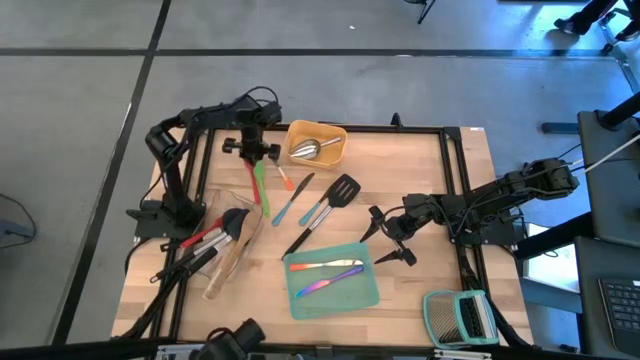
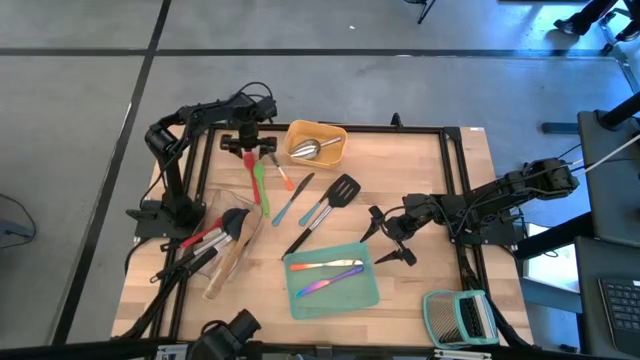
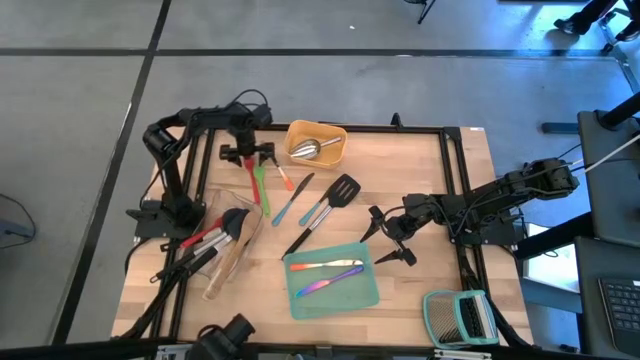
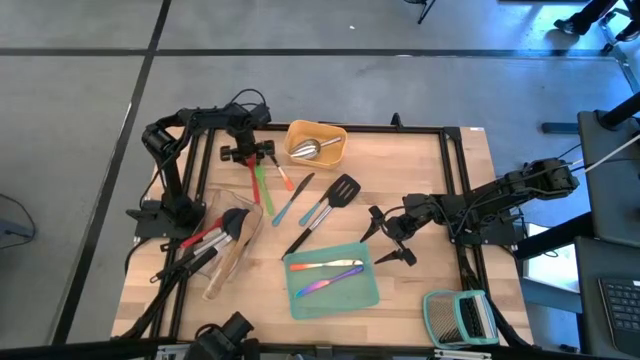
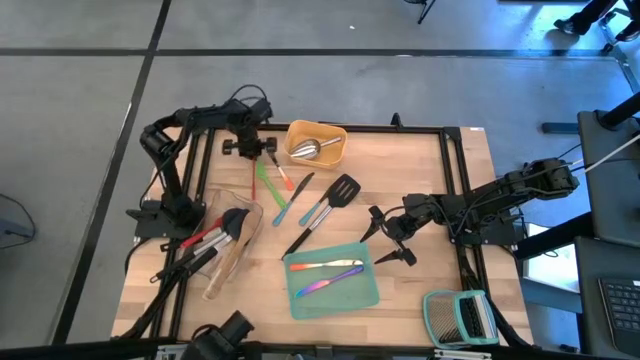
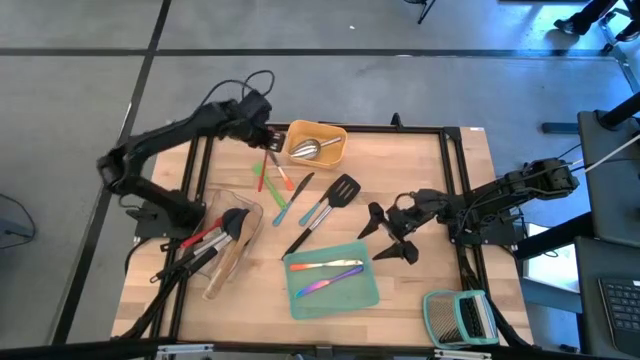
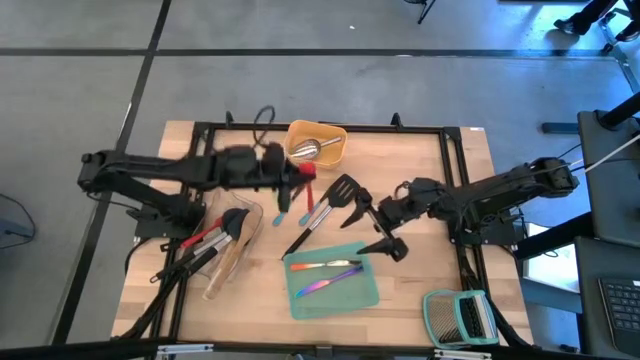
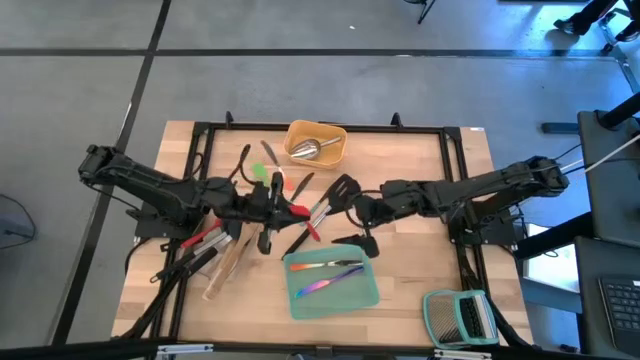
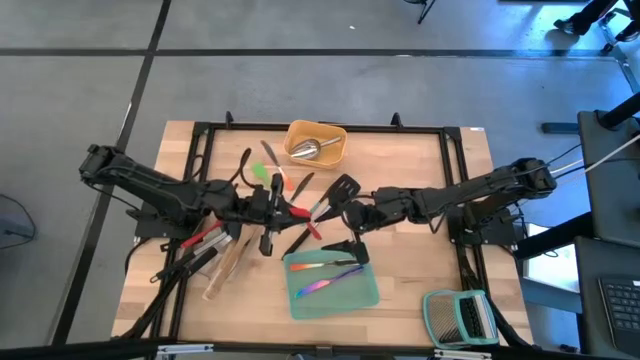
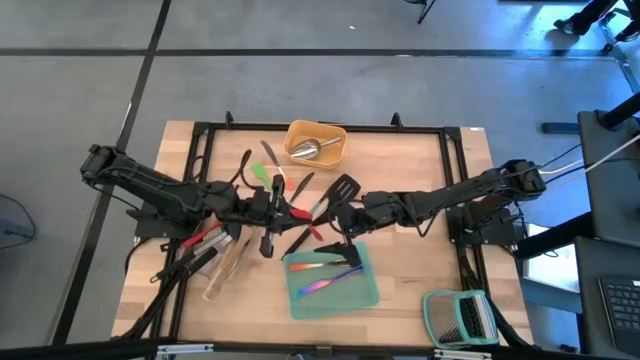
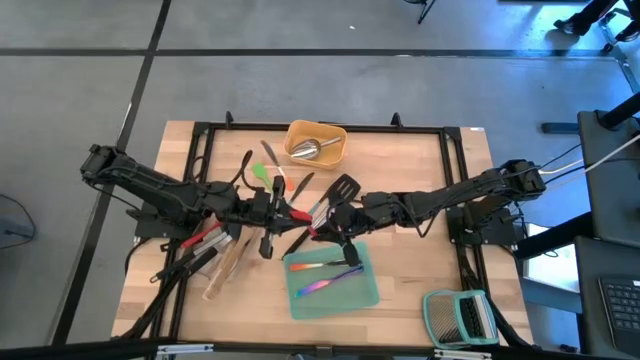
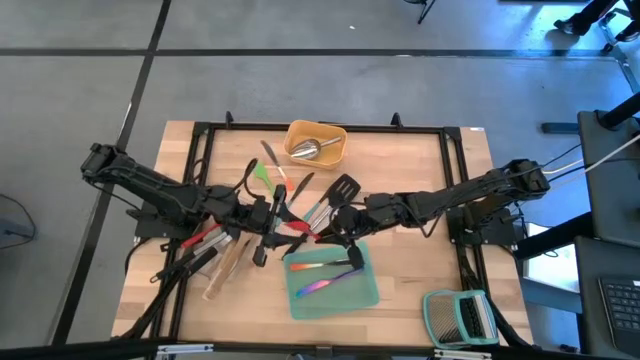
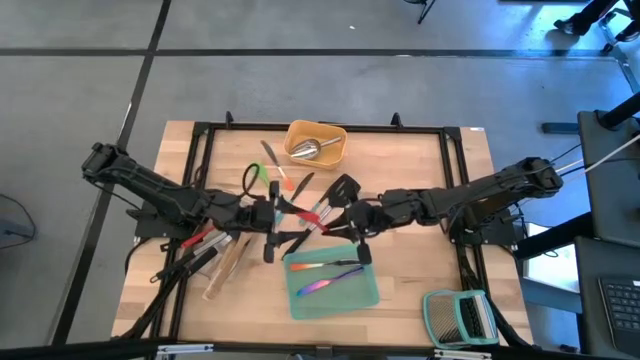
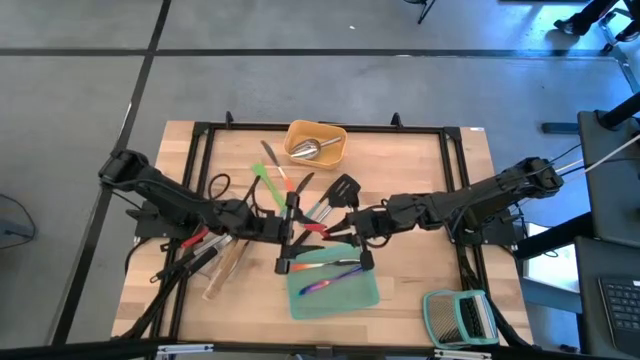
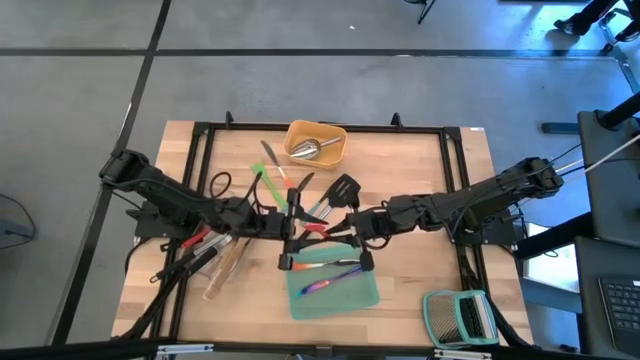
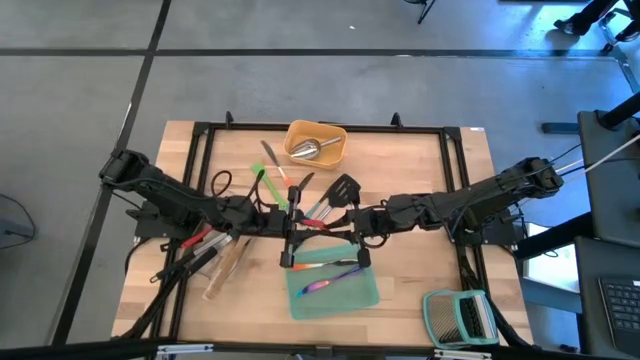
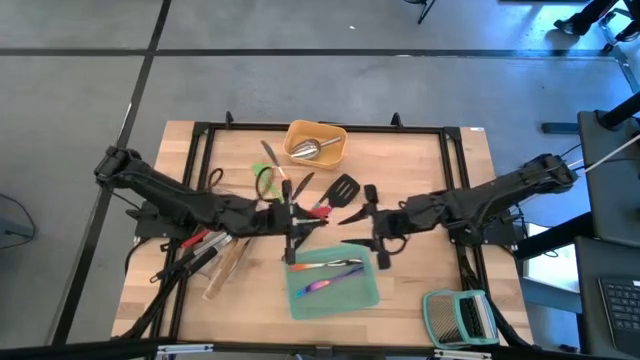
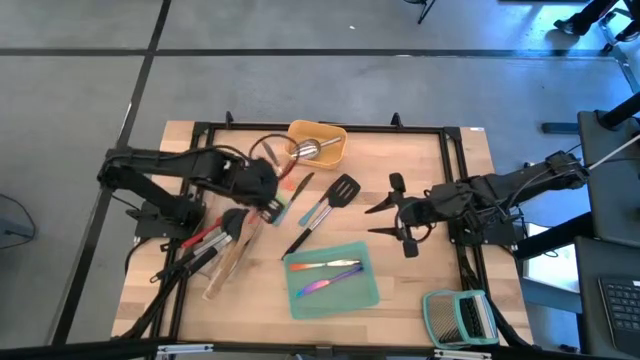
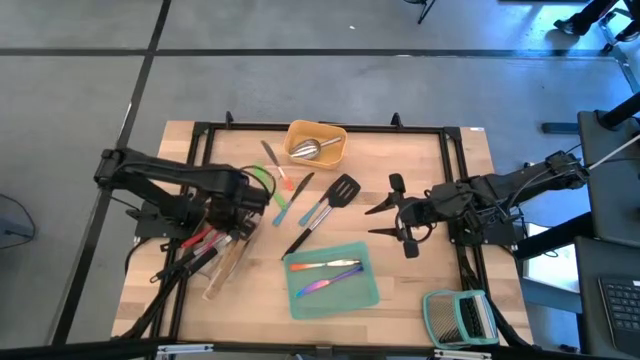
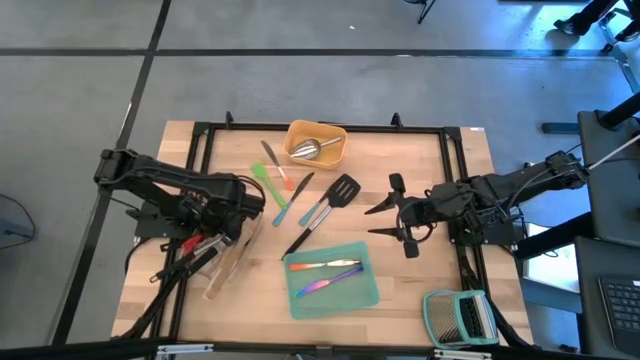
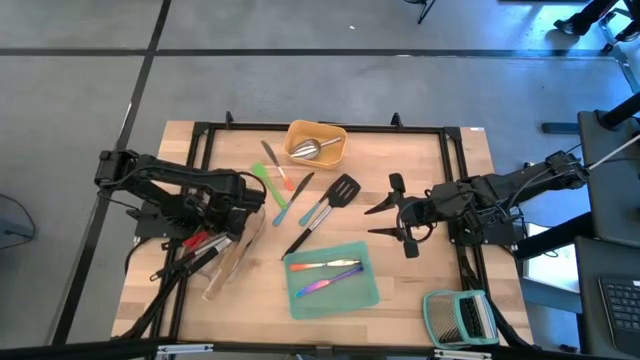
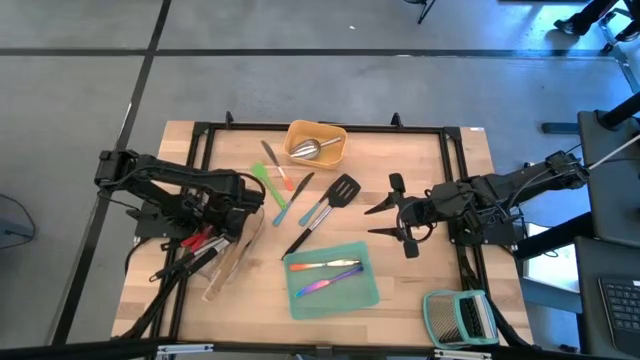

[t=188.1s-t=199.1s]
Task: Pick & Place Kitchen Items
Put the red spatula into the transparent bin

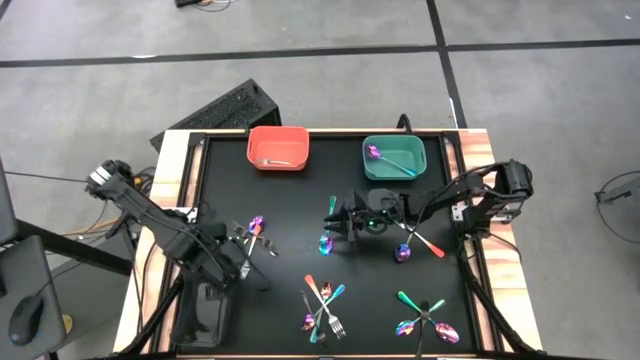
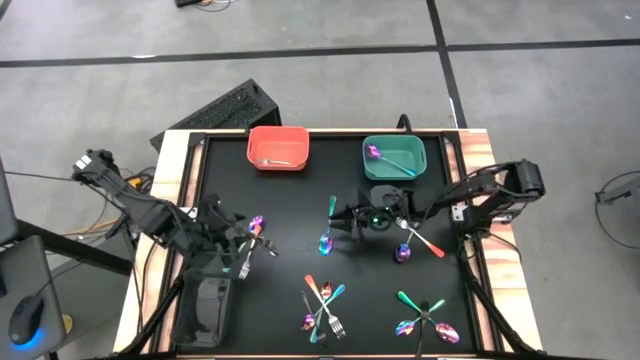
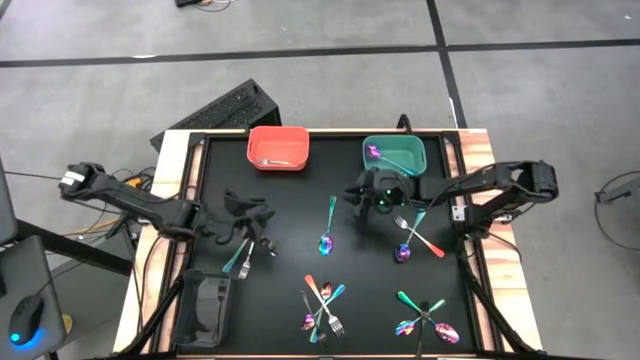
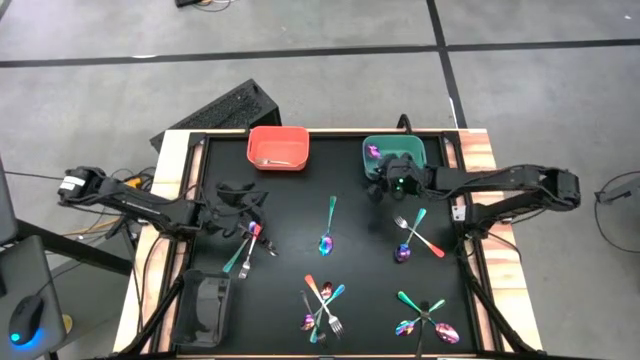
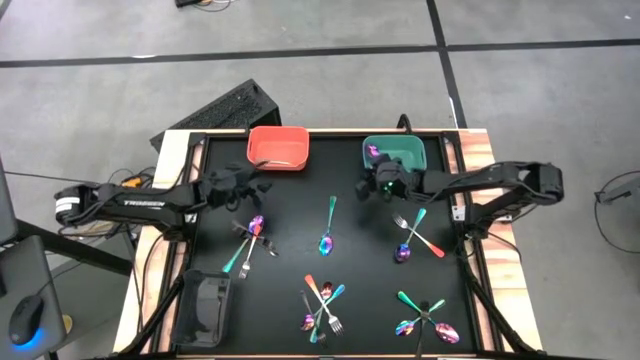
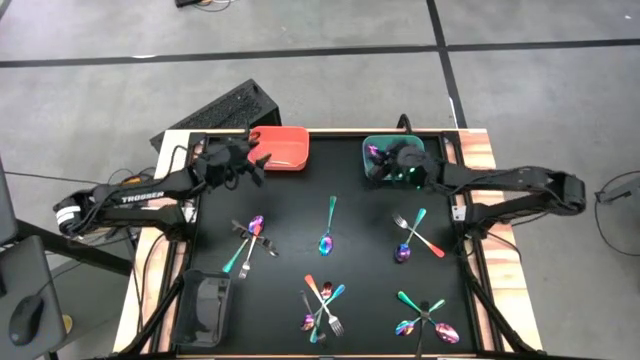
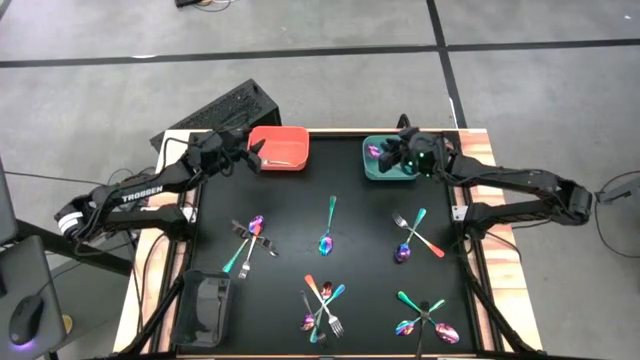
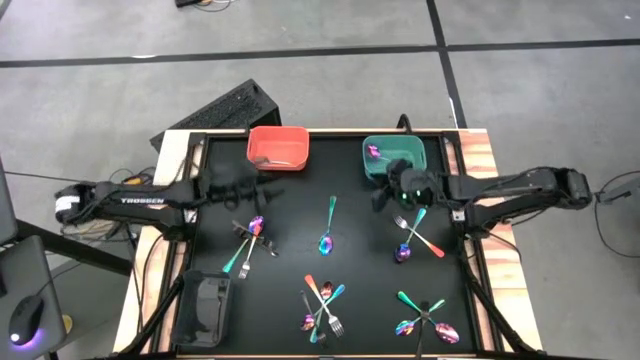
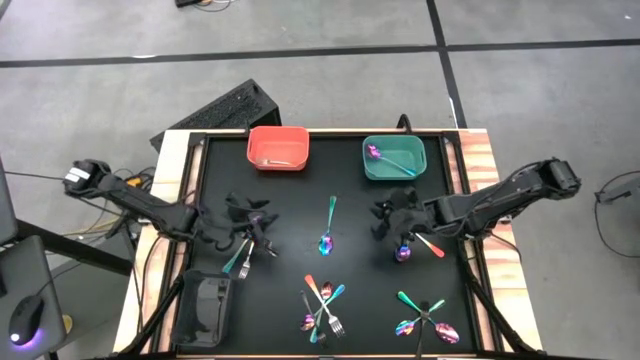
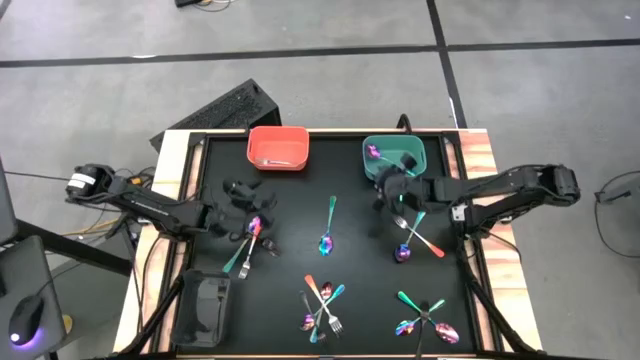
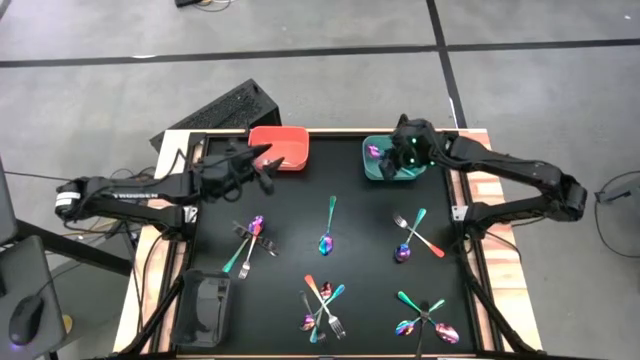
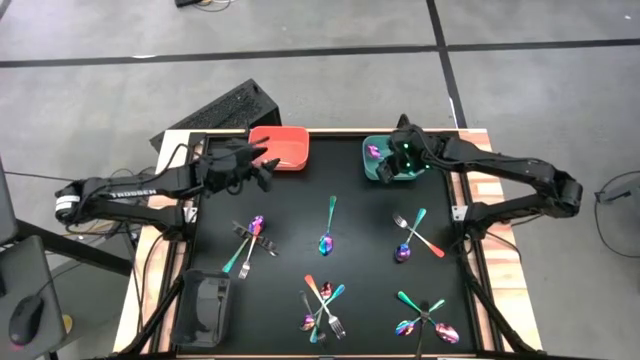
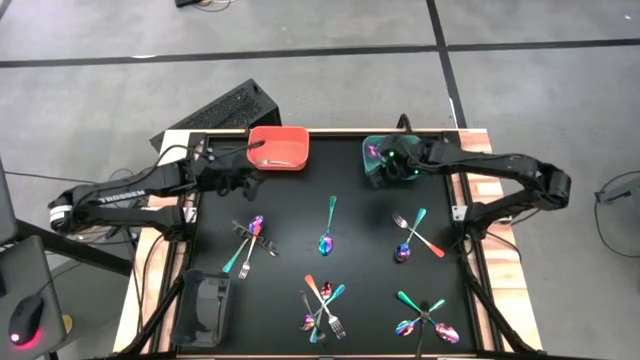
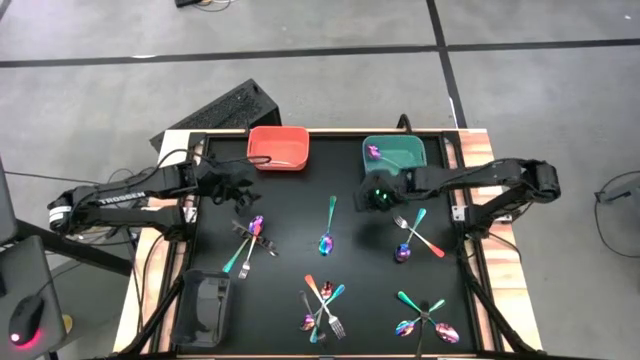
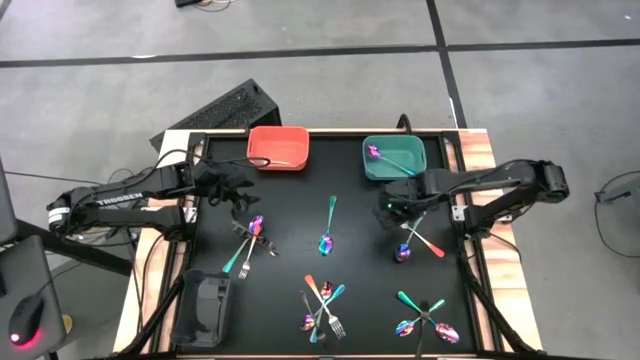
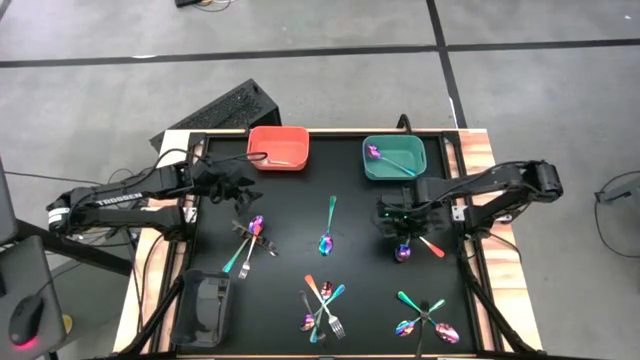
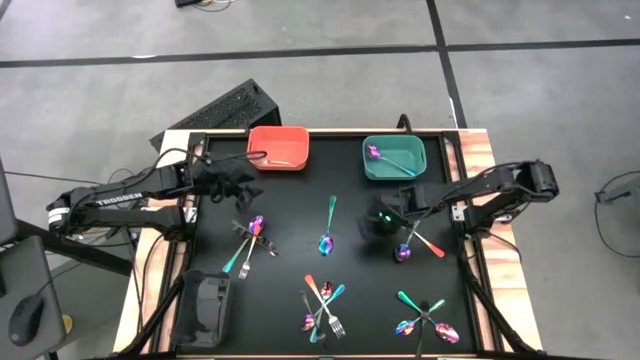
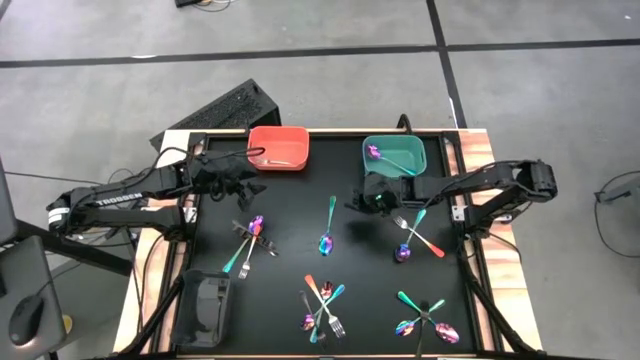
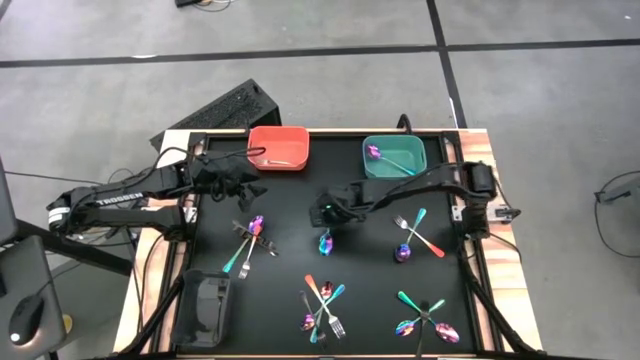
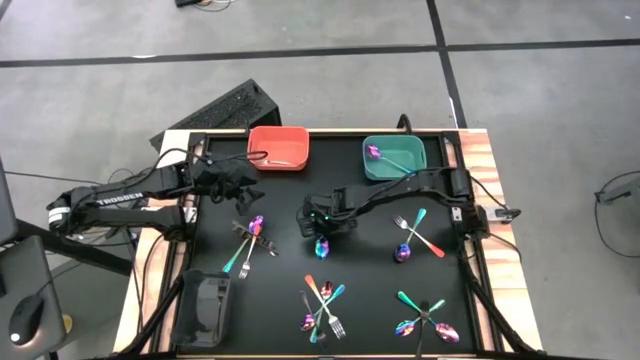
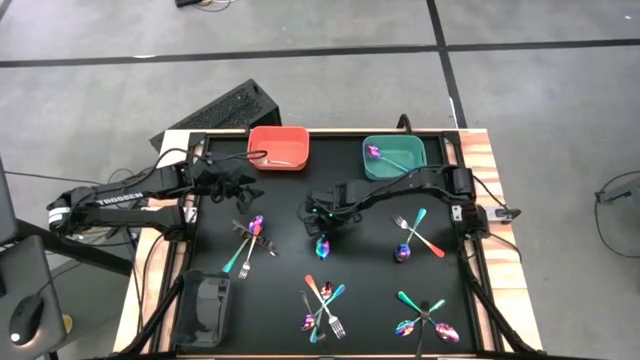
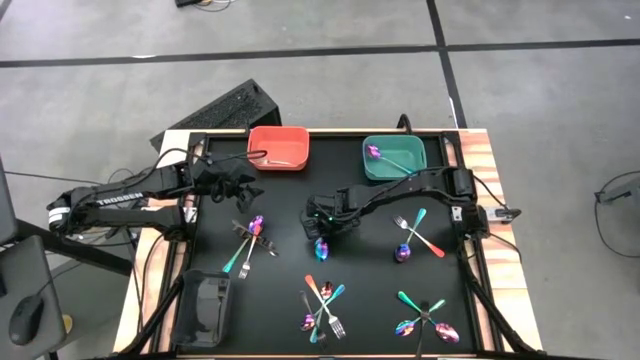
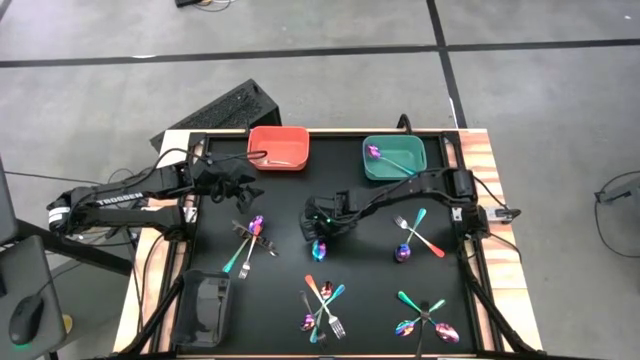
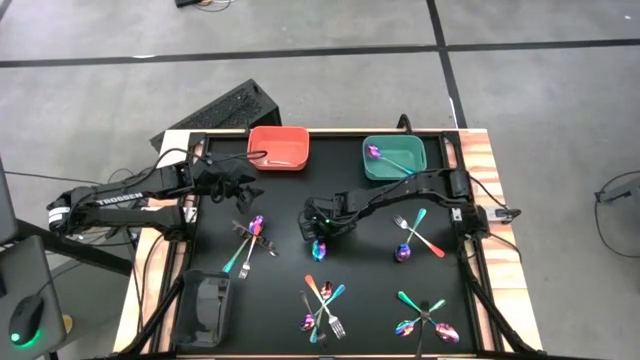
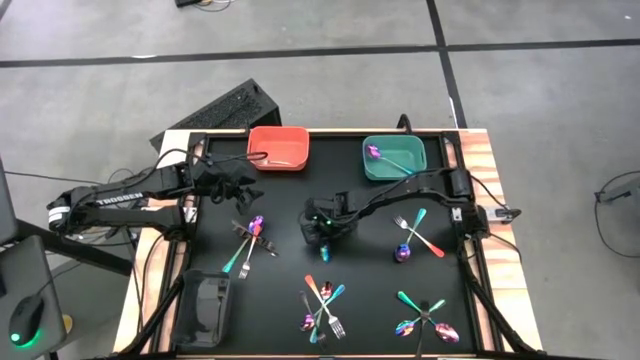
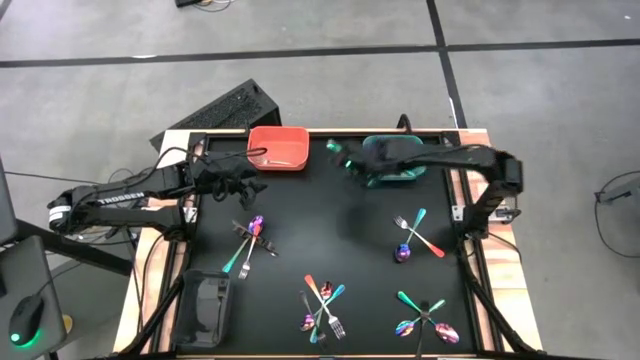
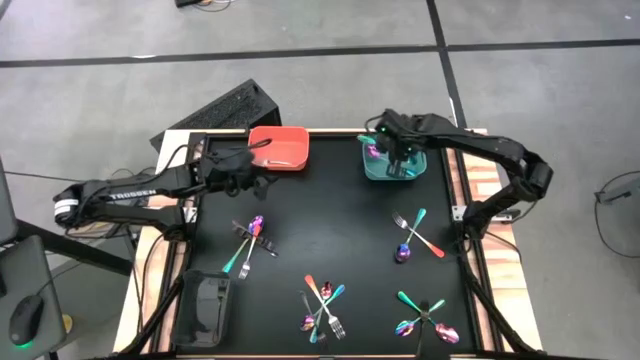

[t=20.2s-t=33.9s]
Task: Sort silverware by color (type)
Put the blue spoon into the blue bin
